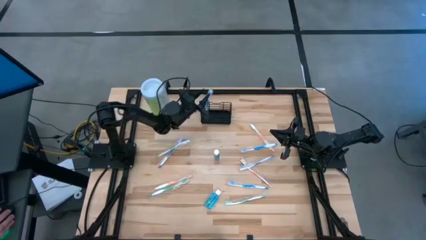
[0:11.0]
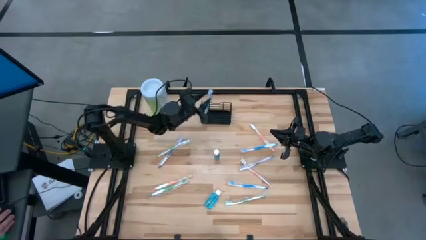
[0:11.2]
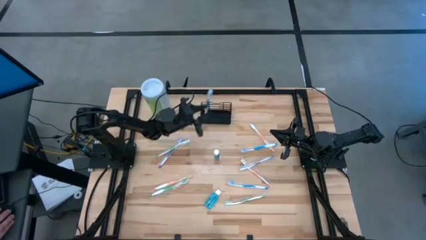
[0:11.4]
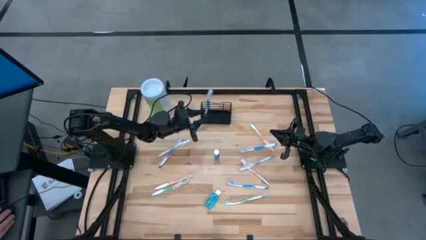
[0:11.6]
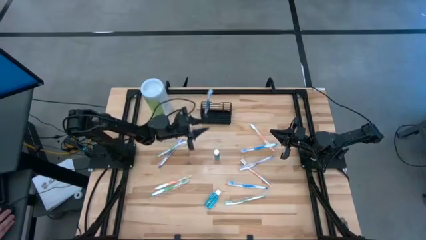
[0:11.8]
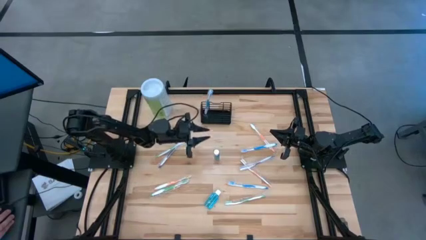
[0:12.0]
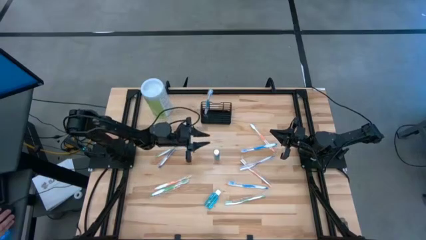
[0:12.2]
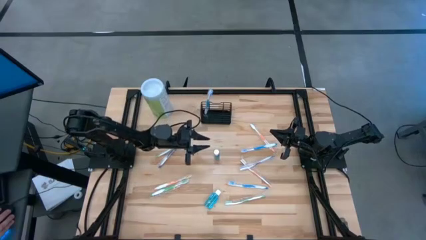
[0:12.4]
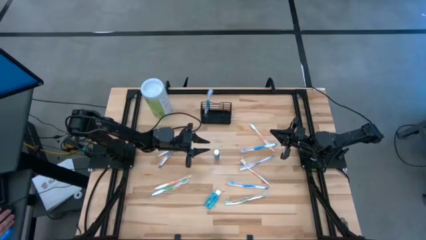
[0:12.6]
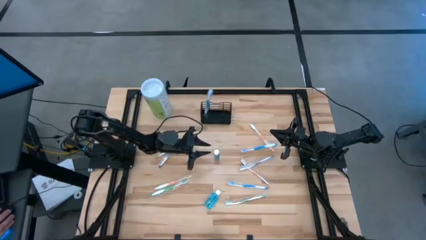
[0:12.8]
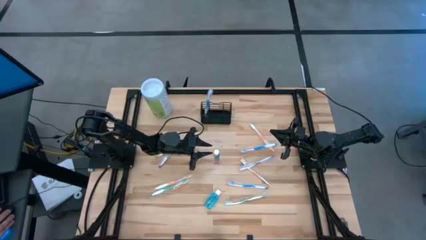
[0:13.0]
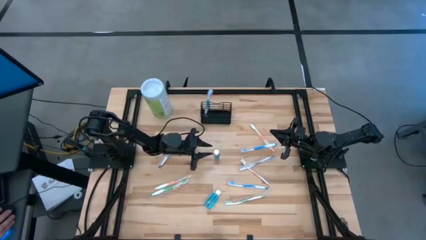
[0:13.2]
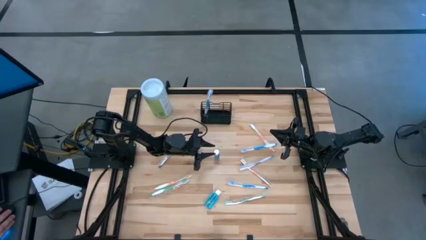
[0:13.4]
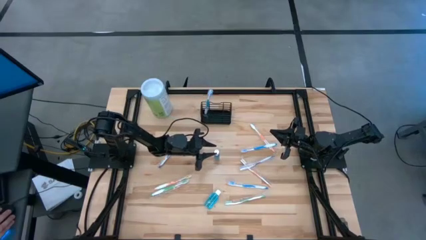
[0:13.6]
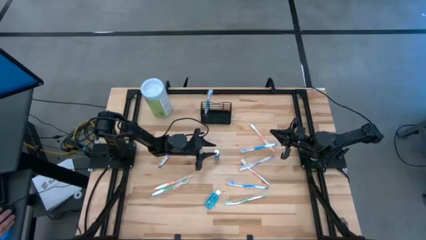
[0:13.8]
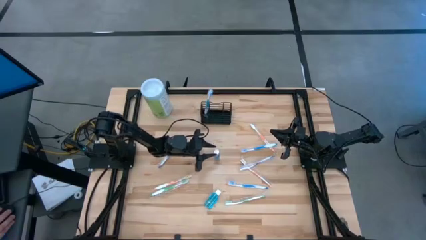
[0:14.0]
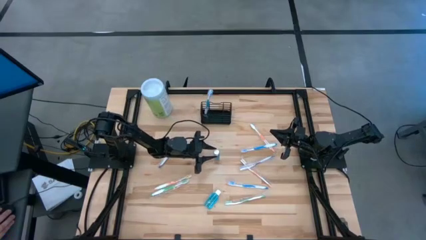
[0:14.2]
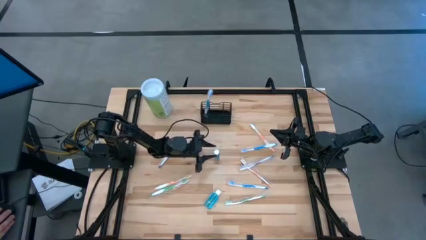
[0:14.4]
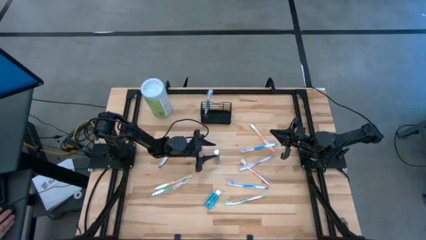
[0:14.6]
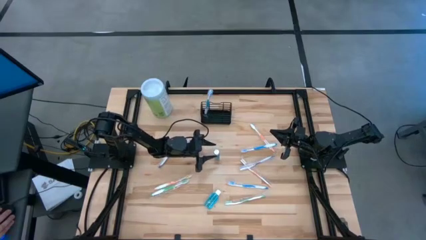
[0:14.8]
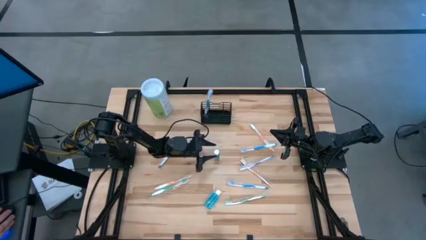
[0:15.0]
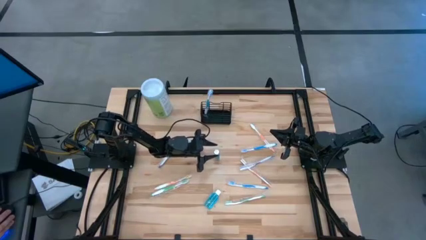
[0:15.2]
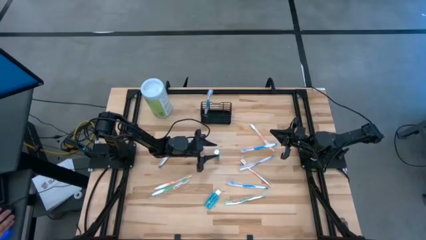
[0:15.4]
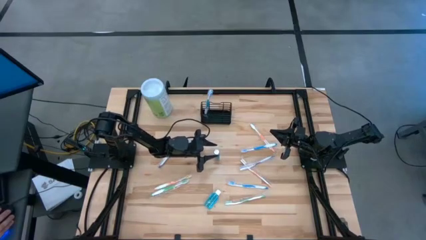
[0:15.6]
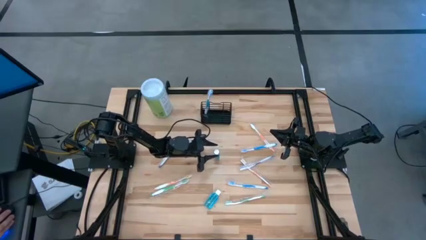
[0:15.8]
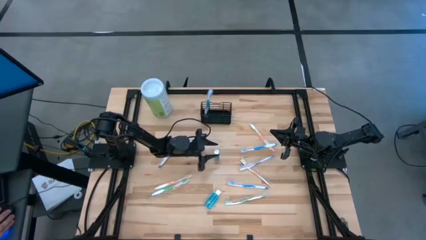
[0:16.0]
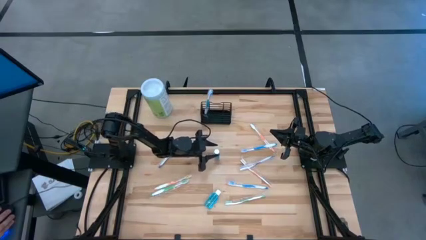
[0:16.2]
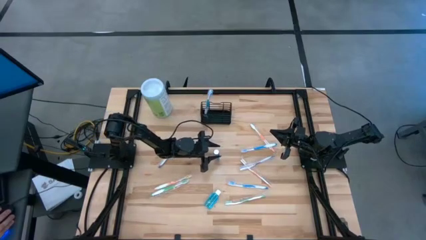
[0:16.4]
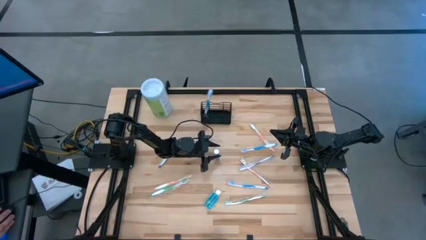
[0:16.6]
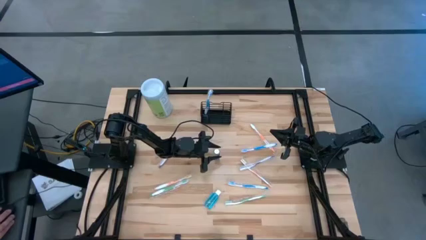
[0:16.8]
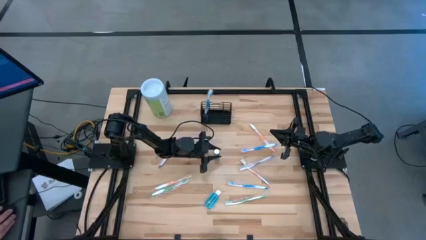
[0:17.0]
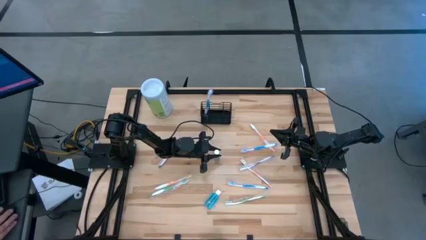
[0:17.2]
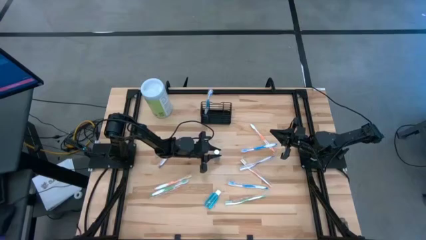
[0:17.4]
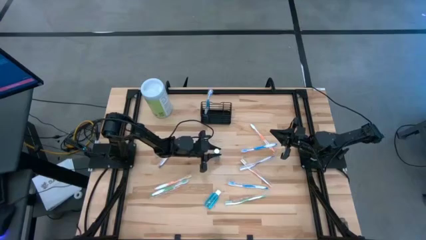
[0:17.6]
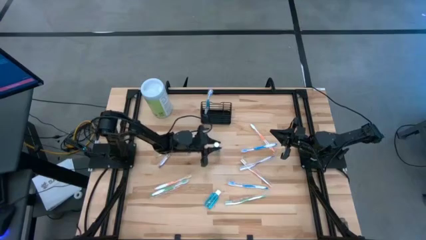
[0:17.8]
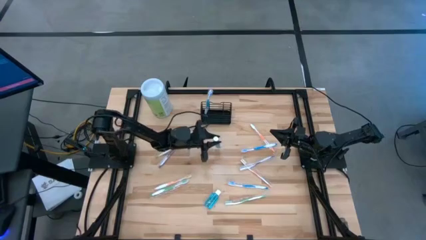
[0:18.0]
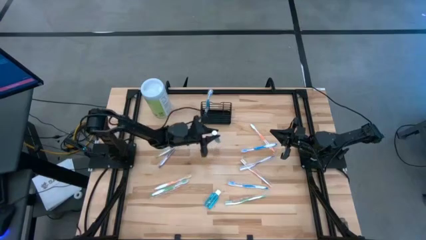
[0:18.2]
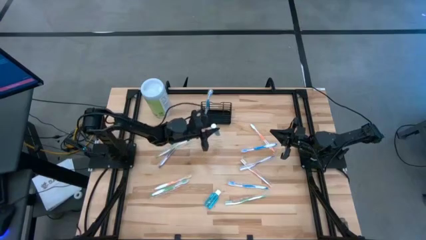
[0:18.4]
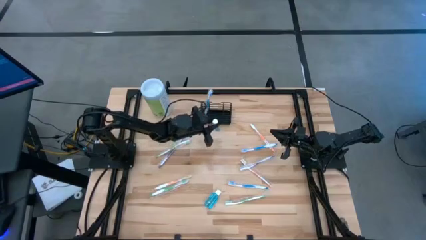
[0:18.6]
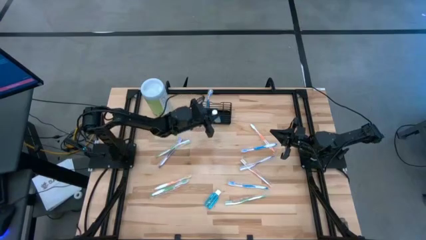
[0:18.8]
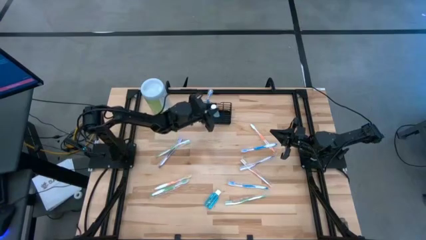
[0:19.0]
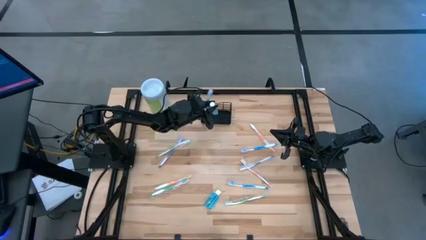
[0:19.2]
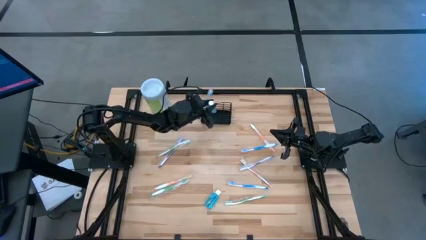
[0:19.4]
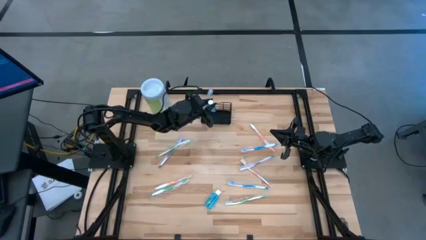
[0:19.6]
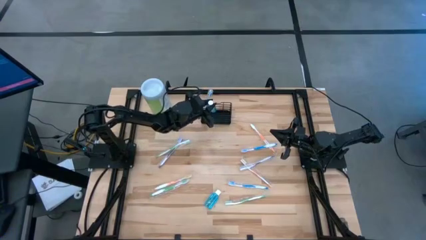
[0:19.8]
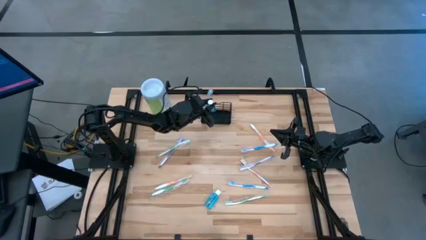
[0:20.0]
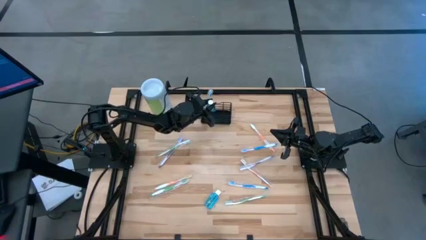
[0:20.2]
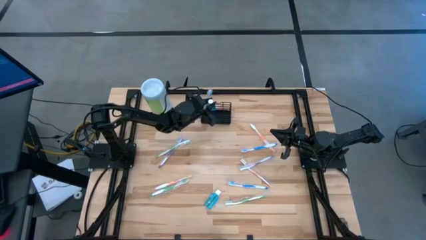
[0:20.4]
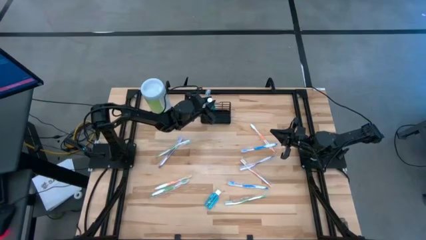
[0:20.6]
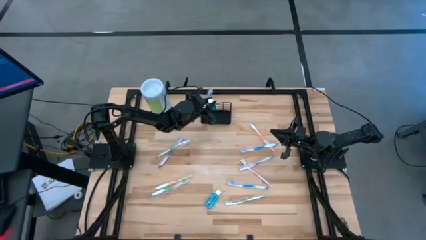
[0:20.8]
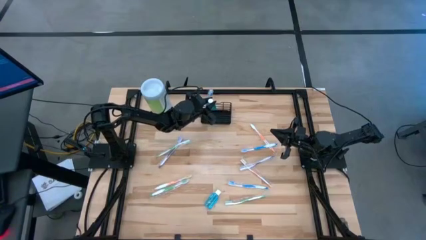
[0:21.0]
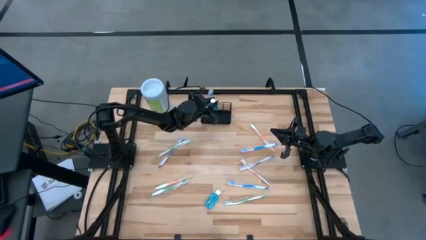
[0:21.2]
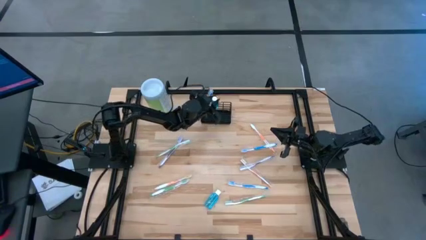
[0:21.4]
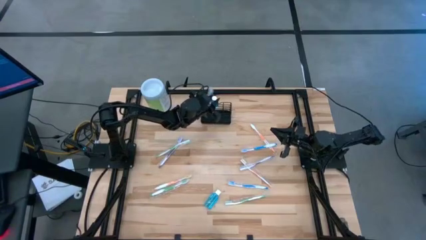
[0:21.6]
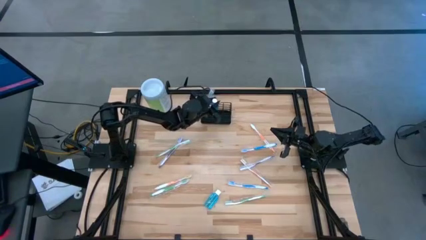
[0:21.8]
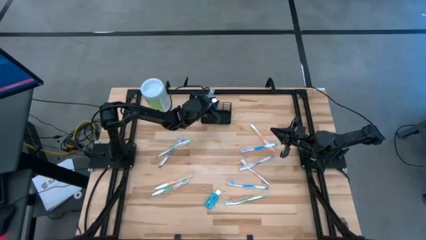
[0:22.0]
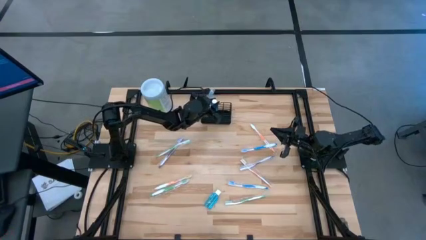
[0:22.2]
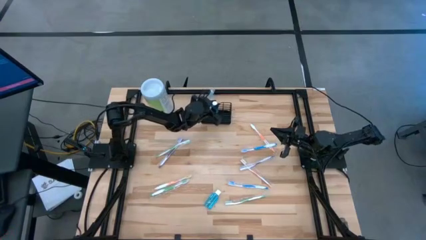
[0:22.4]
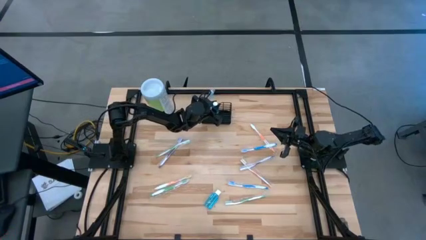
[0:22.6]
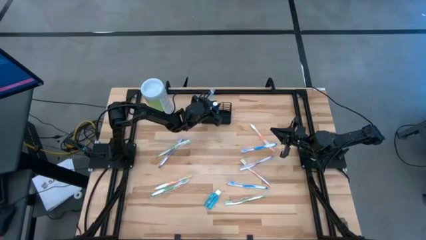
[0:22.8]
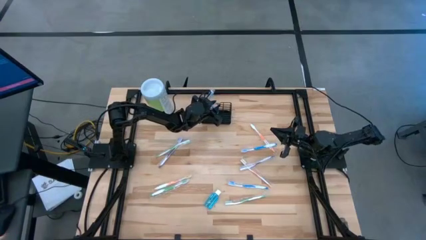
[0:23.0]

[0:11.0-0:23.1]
Task: Pick & Place toothbrushing station
Put the mouthwash into the black wire organizer
